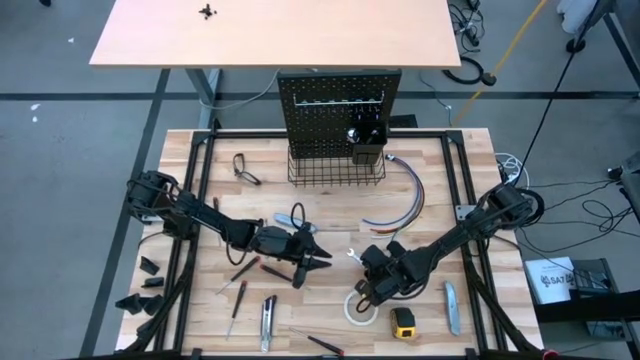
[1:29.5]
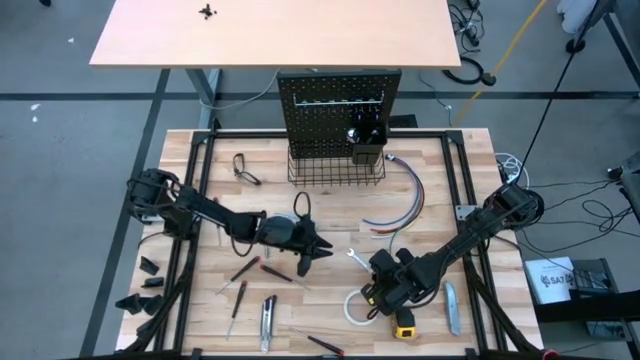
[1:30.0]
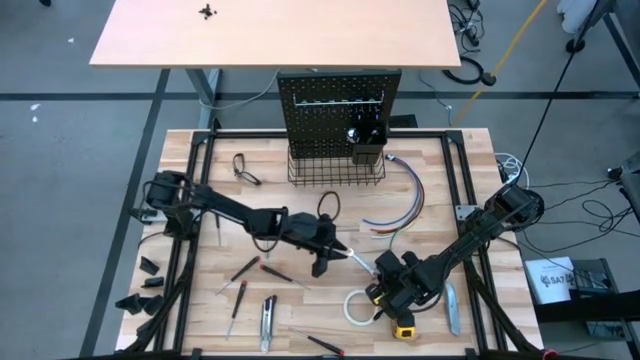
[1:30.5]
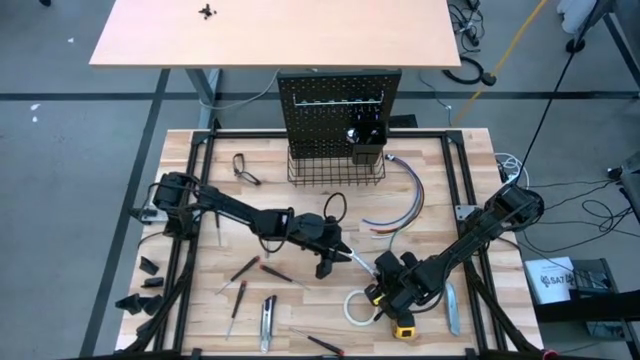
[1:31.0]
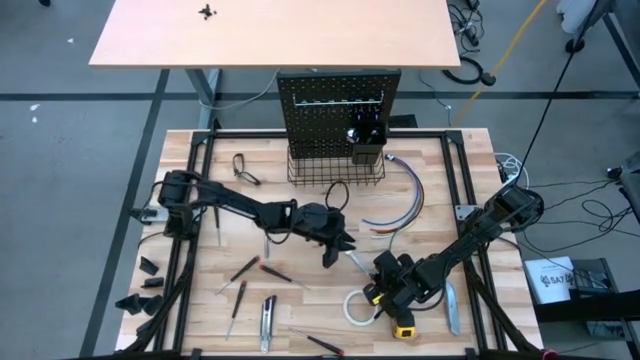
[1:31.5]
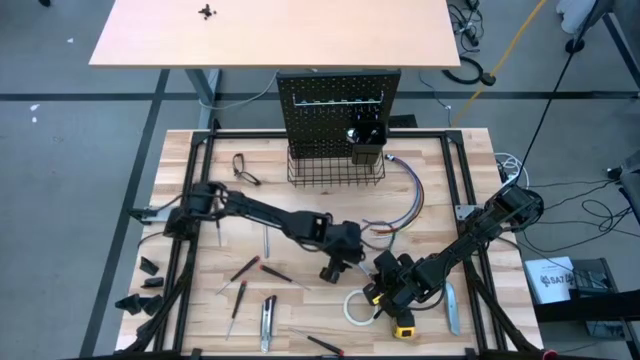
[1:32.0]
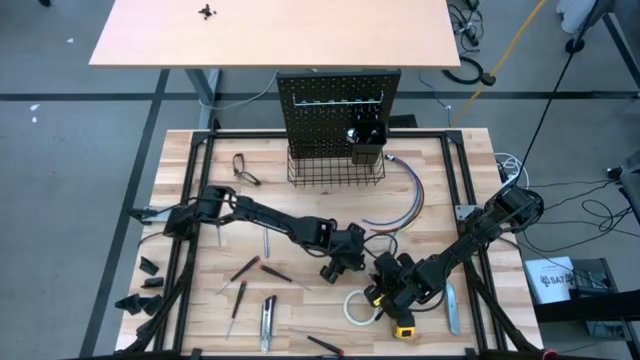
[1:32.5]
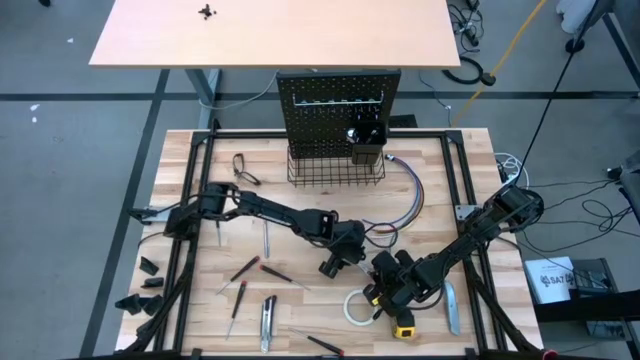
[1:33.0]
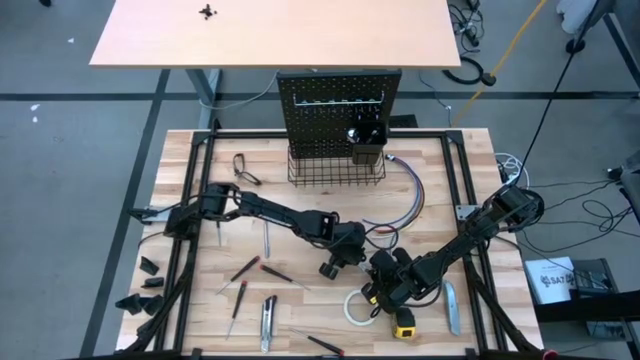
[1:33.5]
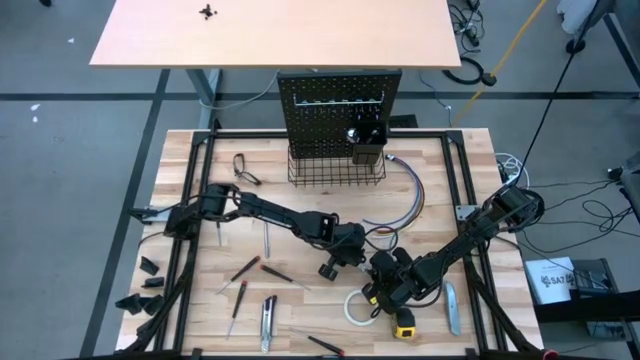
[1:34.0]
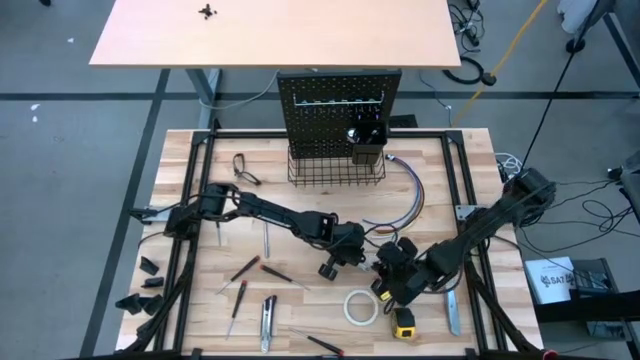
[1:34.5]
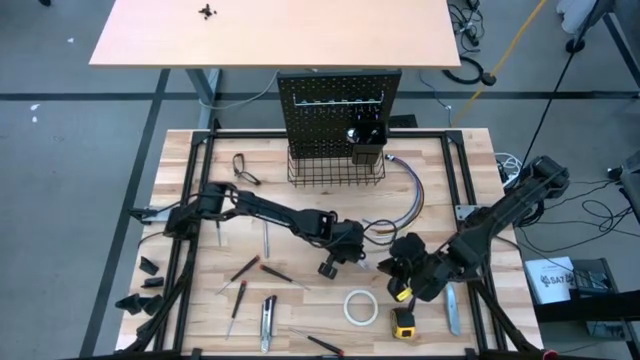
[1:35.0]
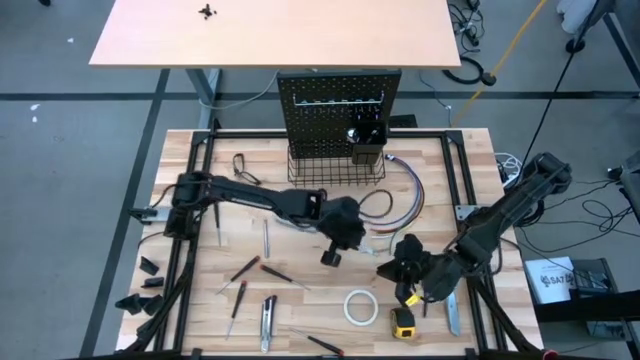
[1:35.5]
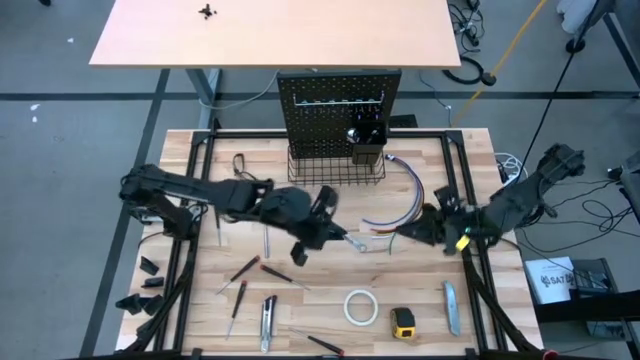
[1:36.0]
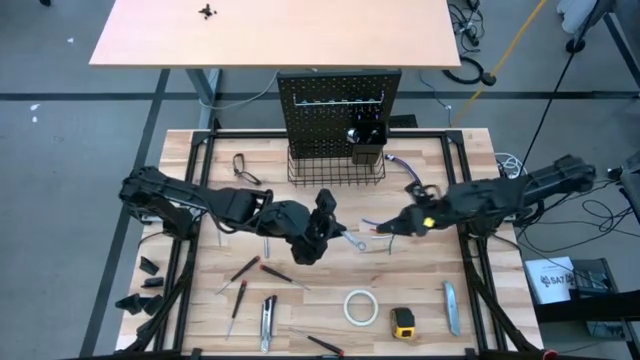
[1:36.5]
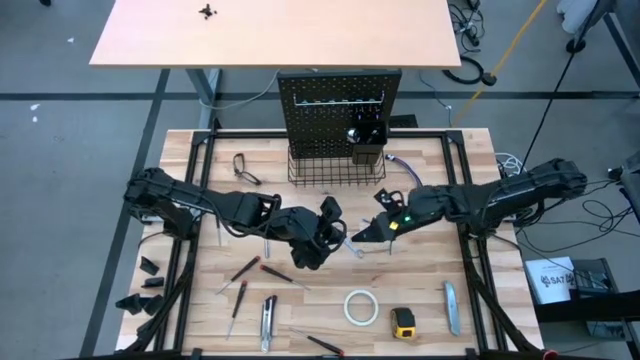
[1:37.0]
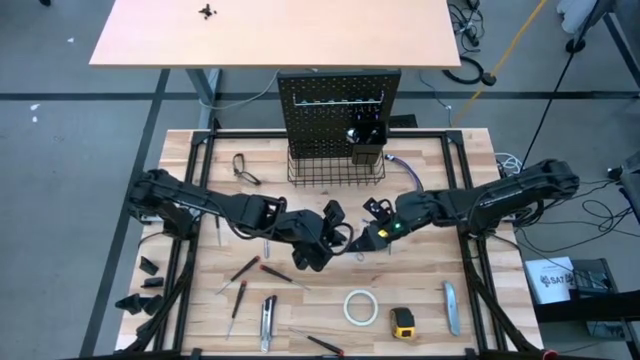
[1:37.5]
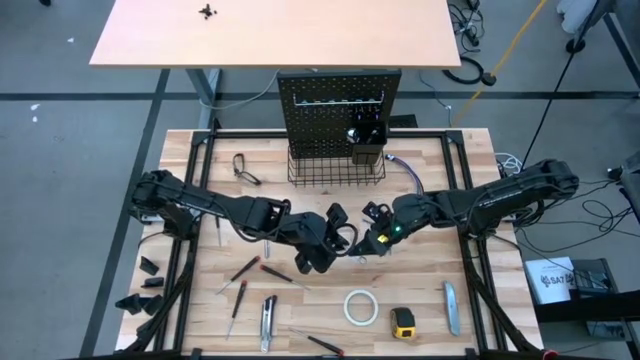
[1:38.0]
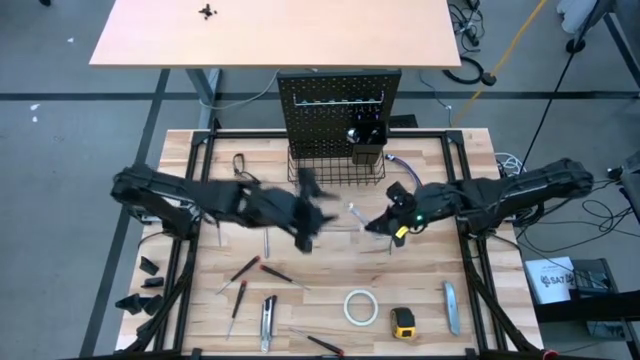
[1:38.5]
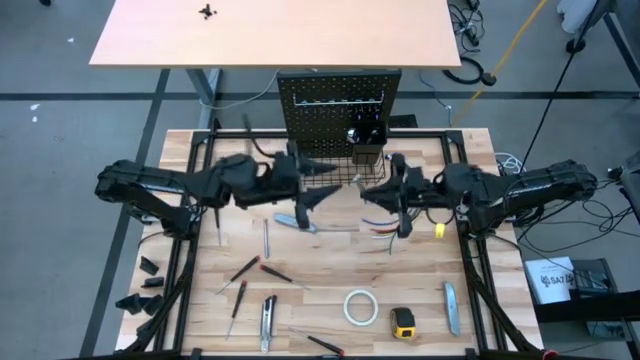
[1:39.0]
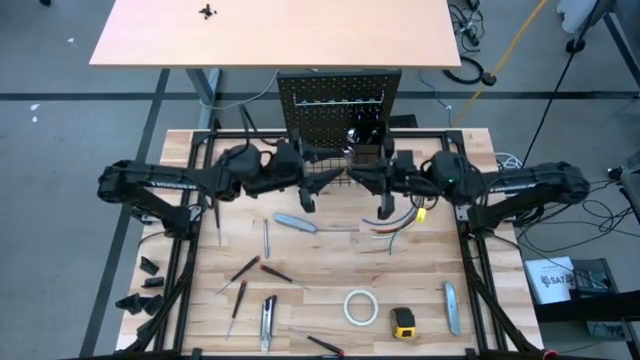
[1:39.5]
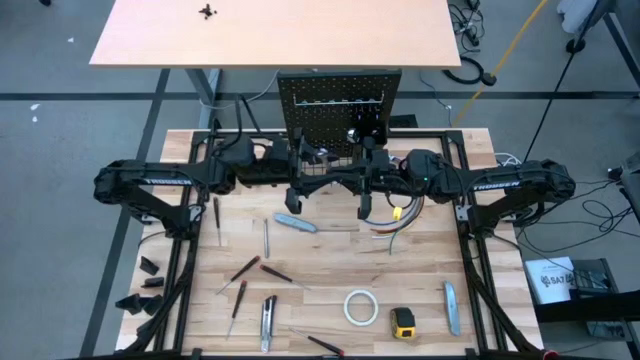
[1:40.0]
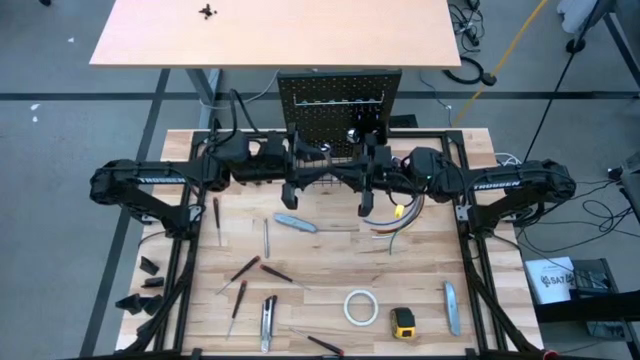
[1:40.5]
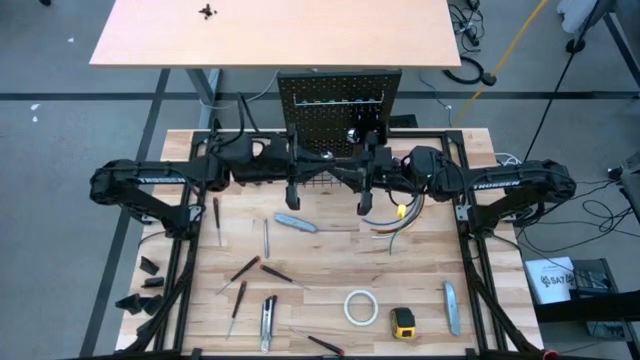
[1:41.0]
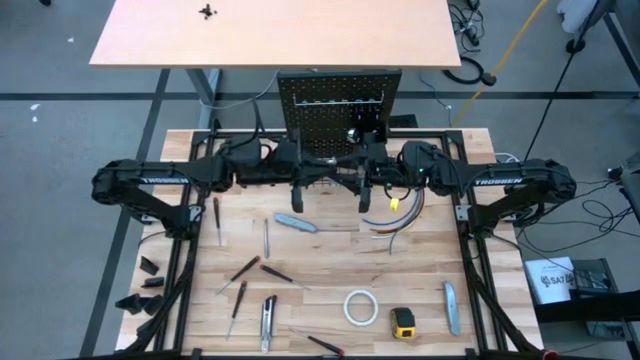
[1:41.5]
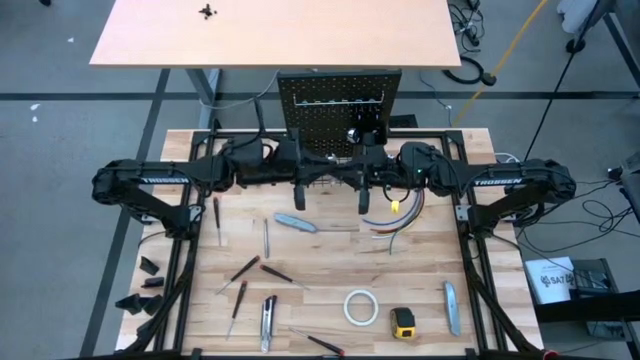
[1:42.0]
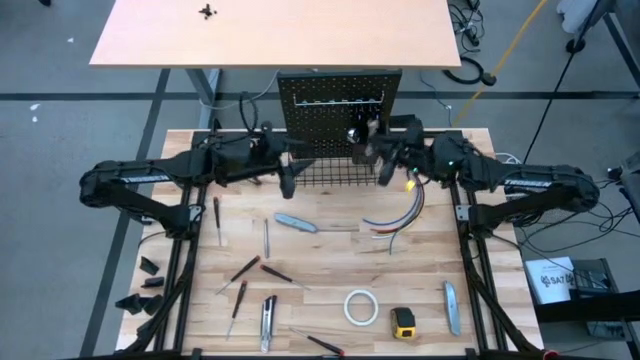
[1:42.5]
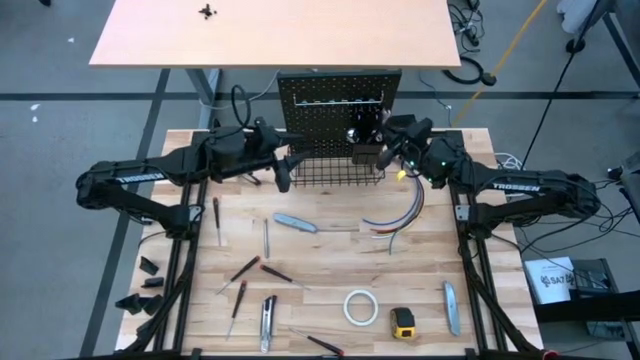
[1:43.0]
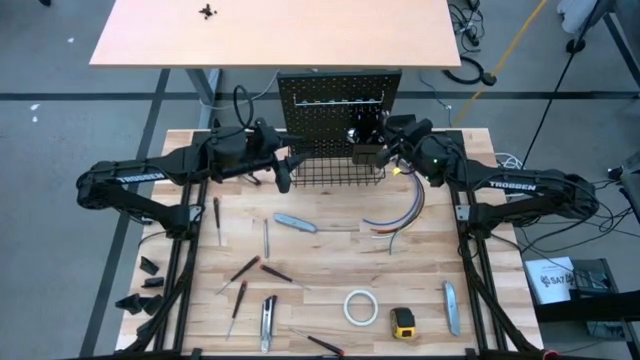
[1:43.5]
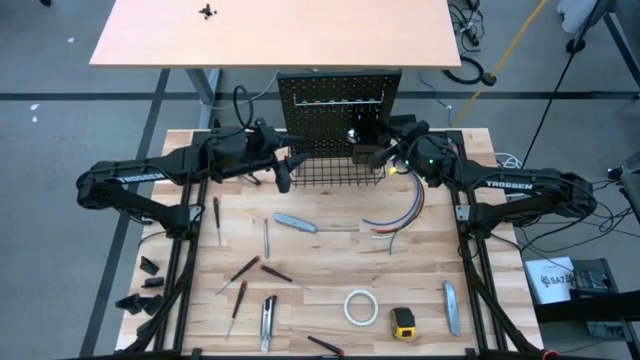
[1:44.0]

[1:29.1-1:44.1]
Task: Hang tools onto peg board
Put the wrench into the black bin on the pegboard

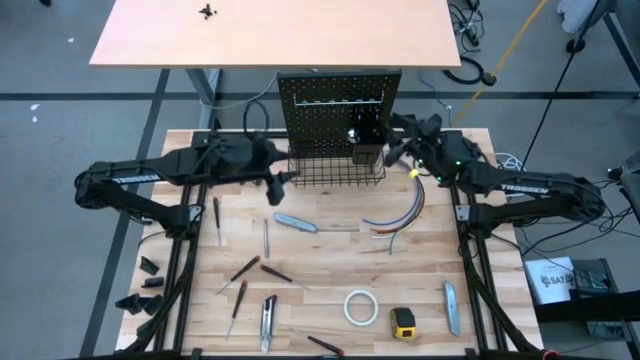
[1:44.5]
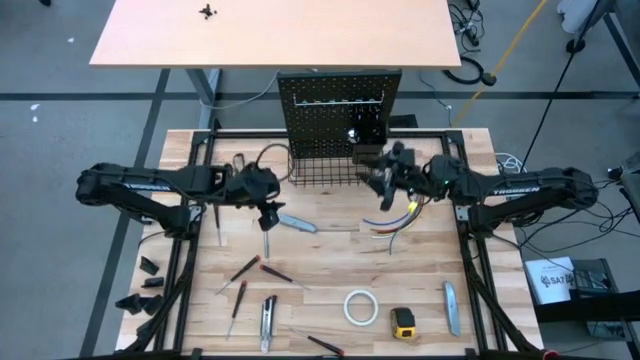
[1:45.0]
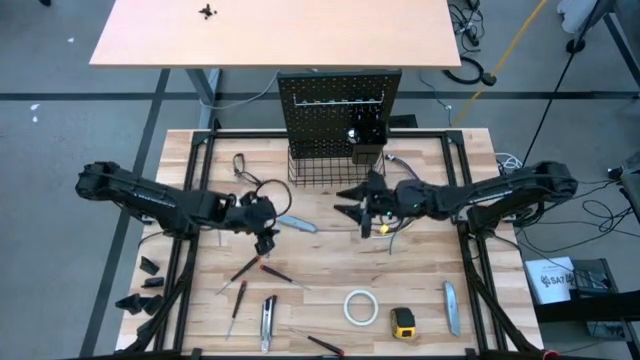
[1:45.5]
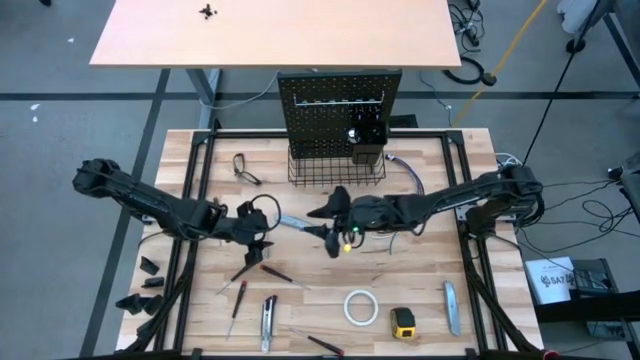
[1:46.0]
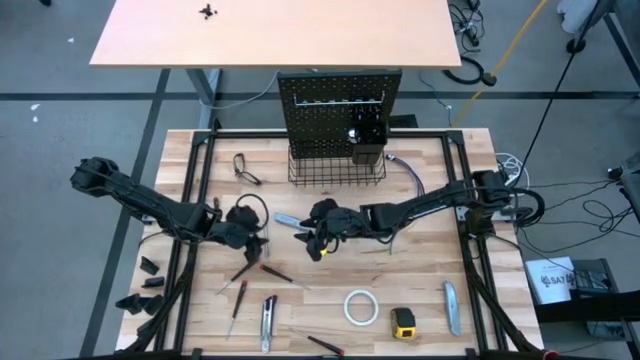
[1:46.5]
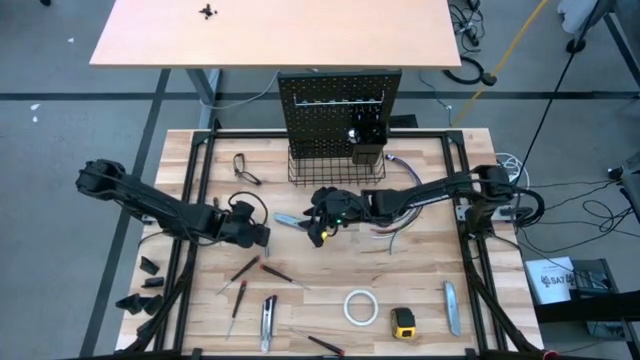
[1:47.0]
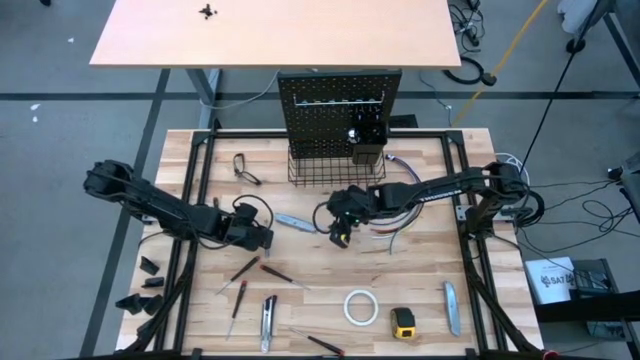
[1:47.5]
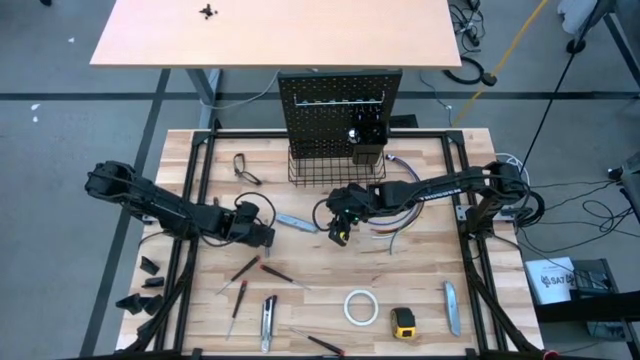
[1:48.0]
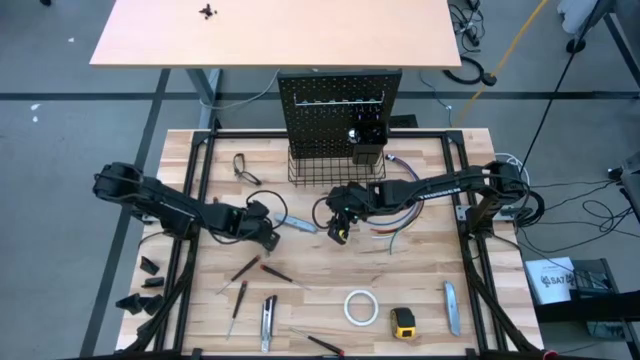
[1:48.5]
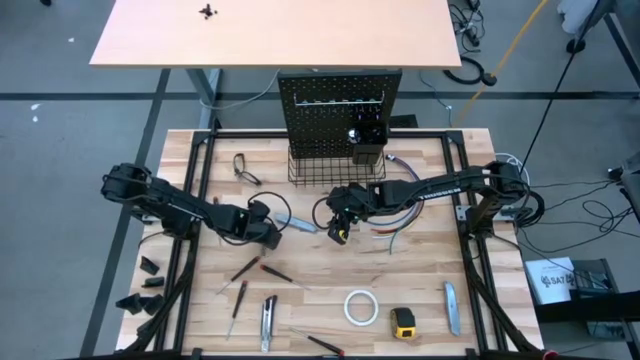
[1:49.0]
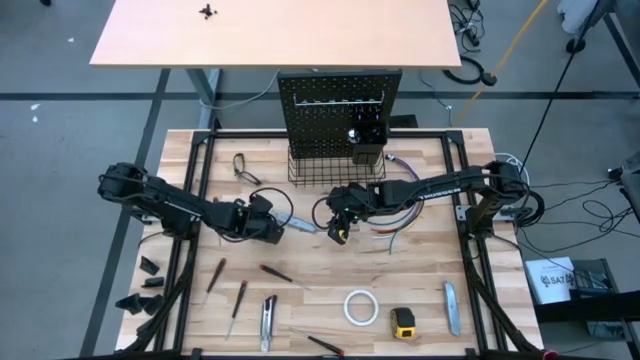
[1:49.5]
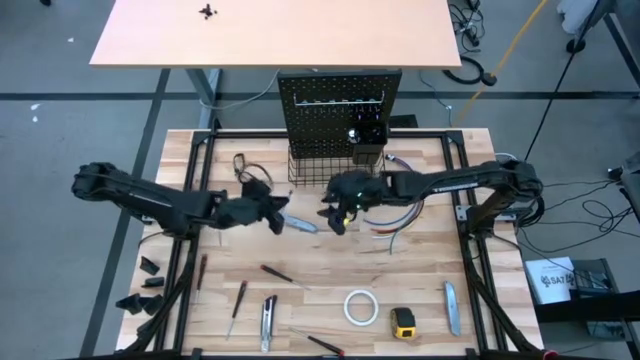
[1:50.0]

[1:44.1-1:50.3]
Put the magnetic telescoping into the black bin on the pegboard
